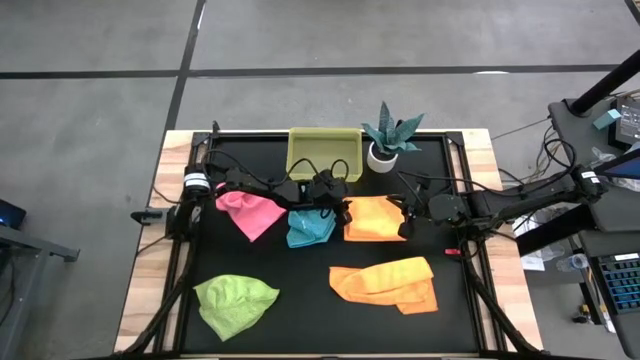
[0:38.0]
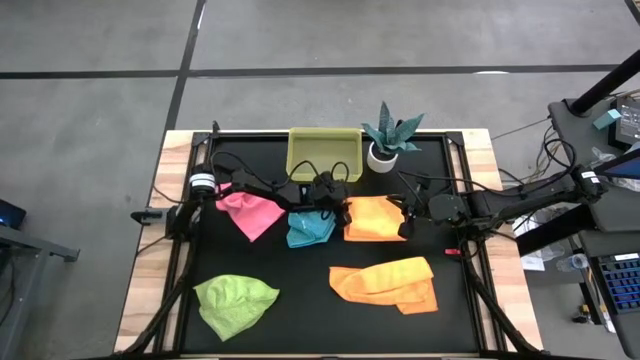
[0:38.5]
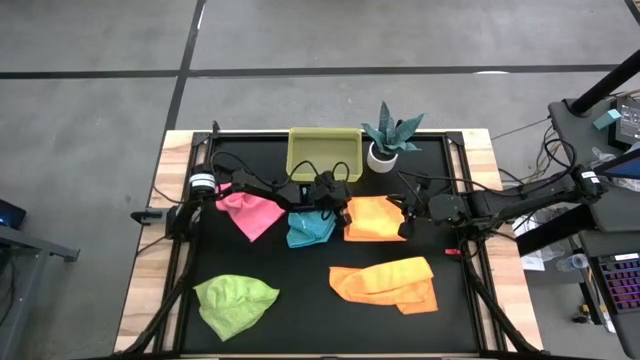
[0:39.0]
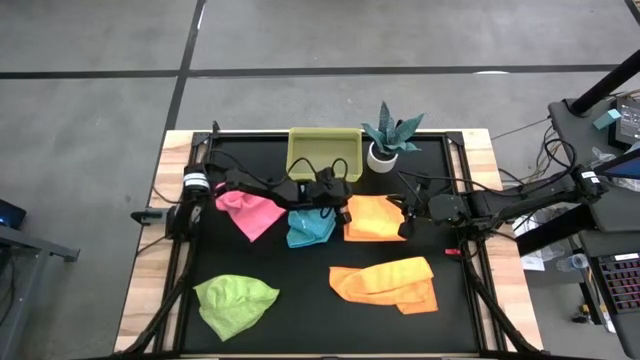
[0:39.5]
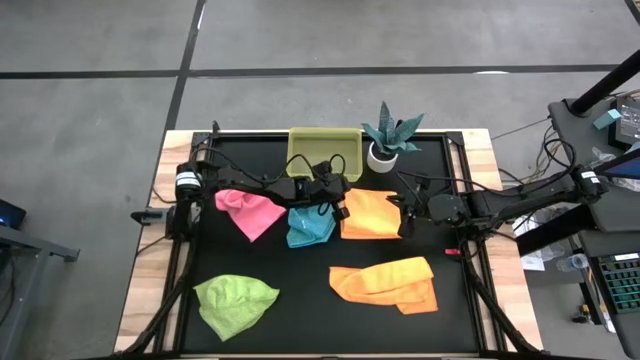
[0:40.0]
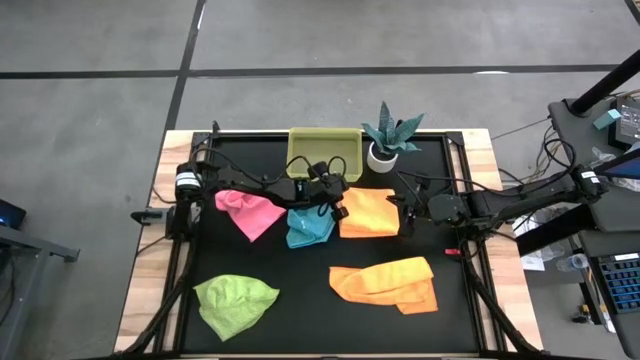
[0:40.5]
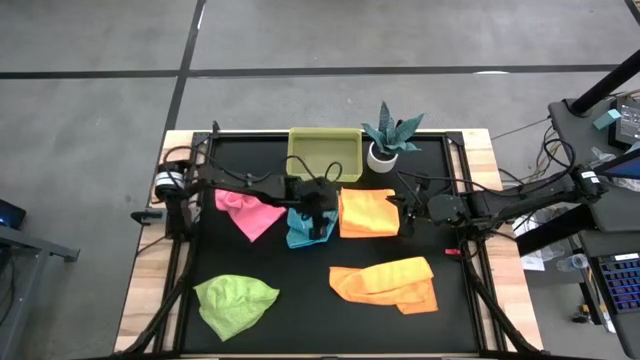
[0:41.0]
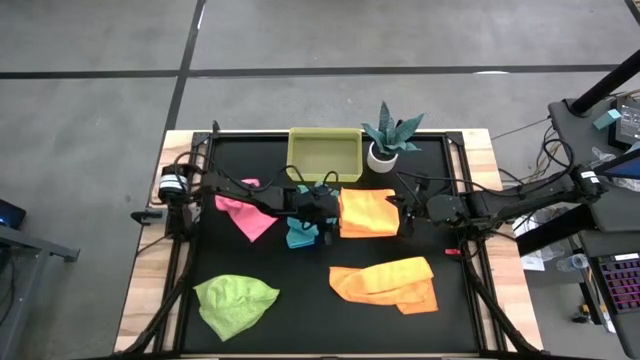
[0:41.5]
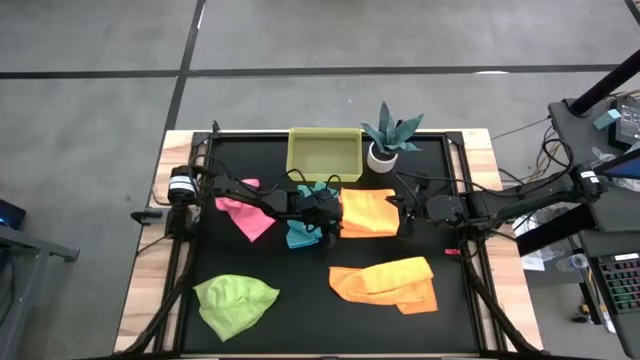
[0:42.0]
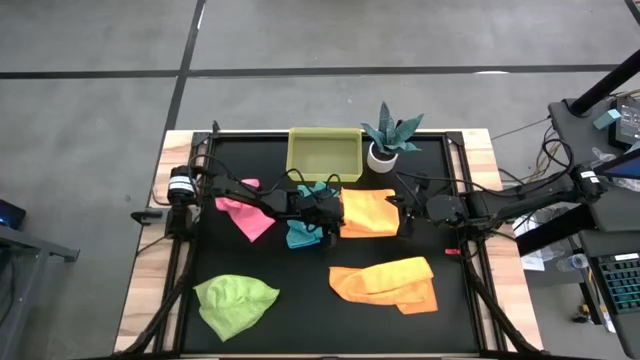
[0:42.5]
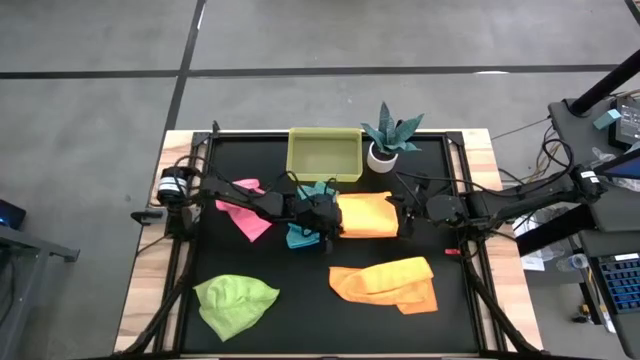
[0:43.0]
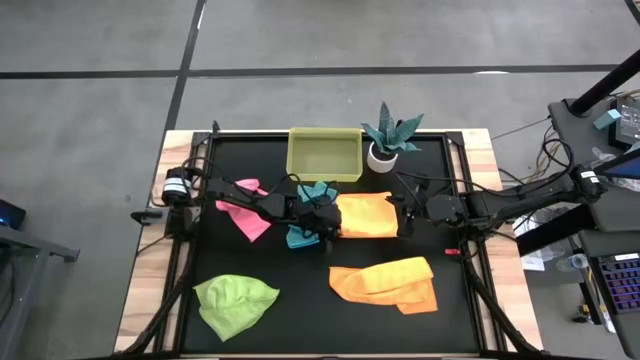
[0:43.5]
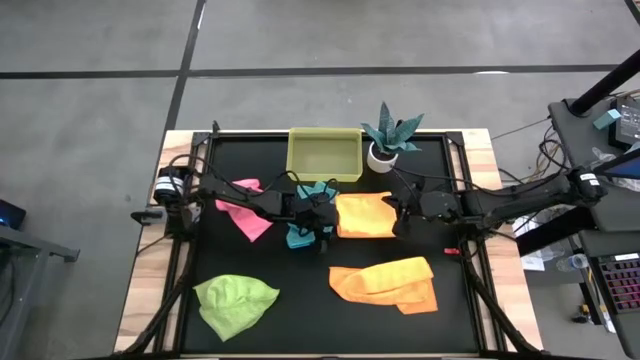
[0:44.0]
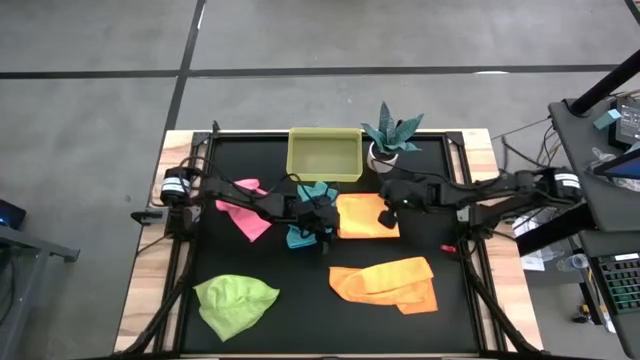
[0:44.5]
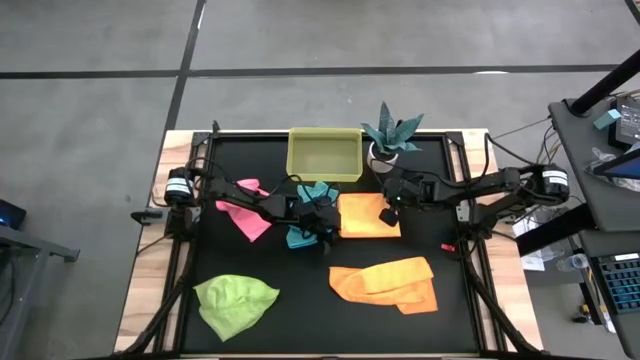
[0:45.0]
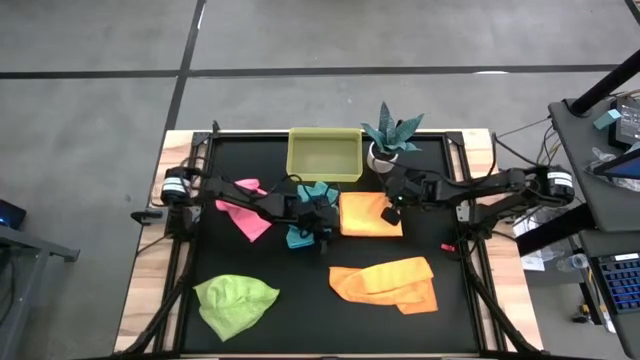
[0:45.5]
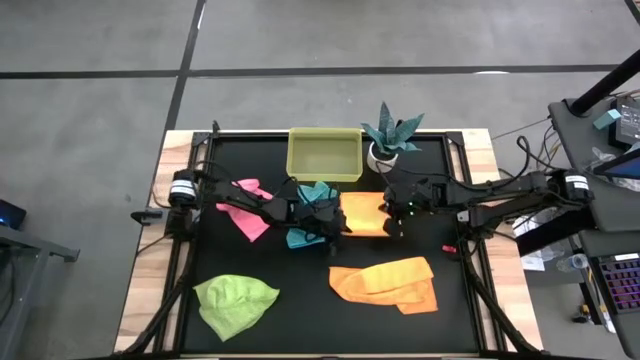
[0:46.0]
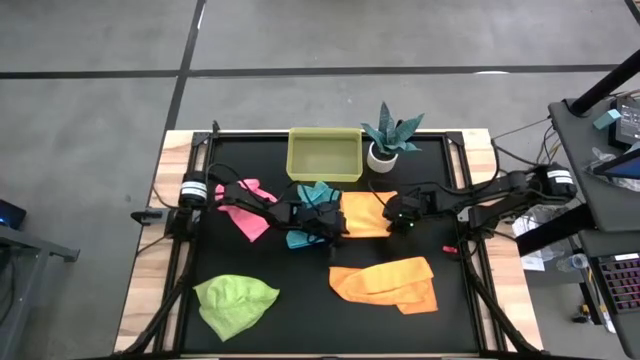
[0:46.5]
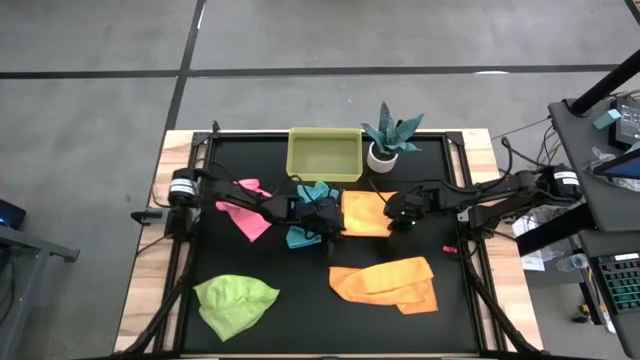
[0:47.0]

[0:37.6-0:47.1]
Task: Fold microfiber towels
Fold the top orange microfiber cloth

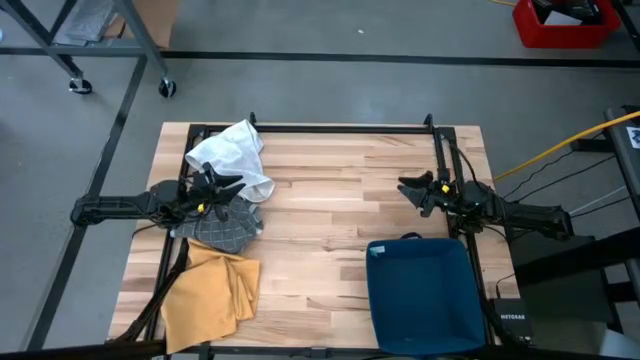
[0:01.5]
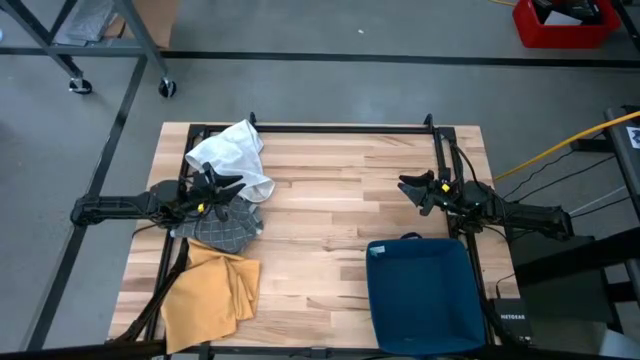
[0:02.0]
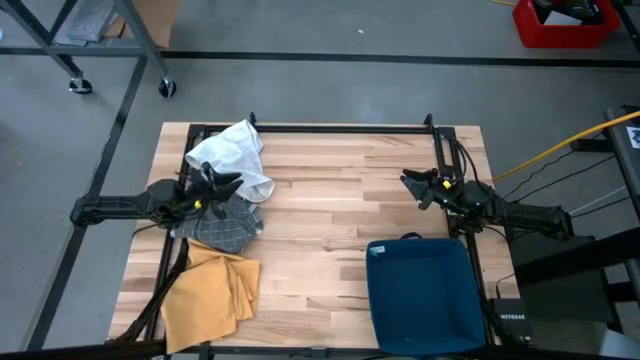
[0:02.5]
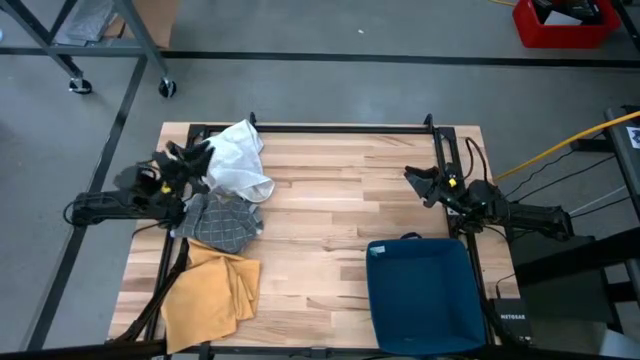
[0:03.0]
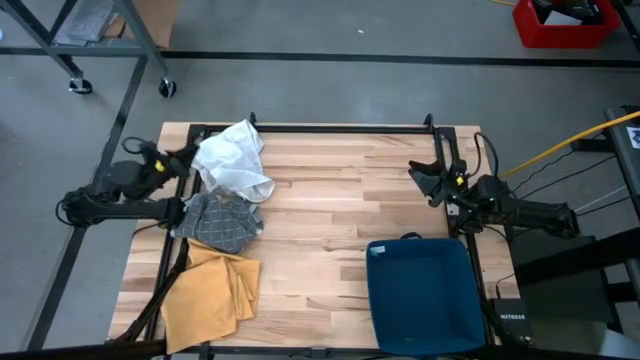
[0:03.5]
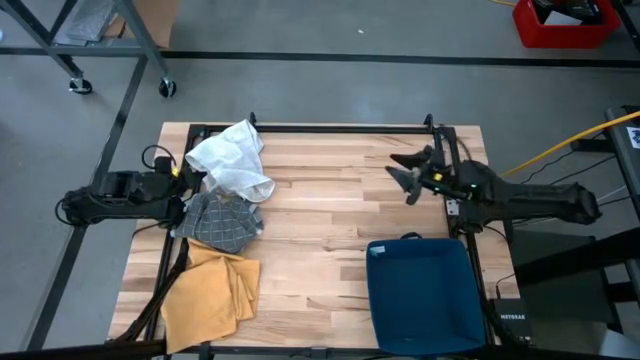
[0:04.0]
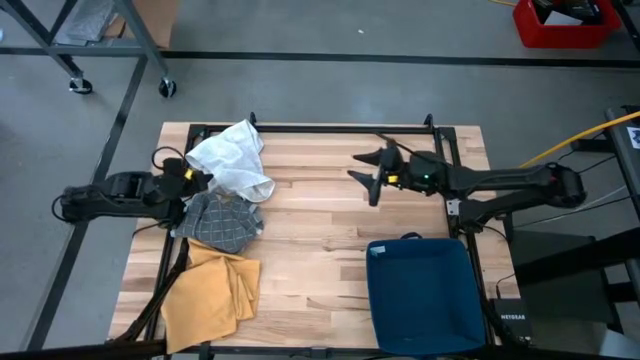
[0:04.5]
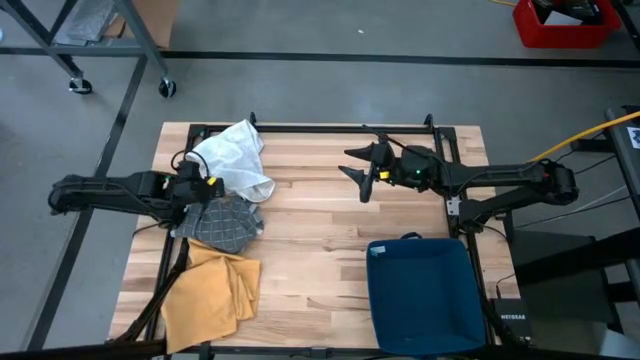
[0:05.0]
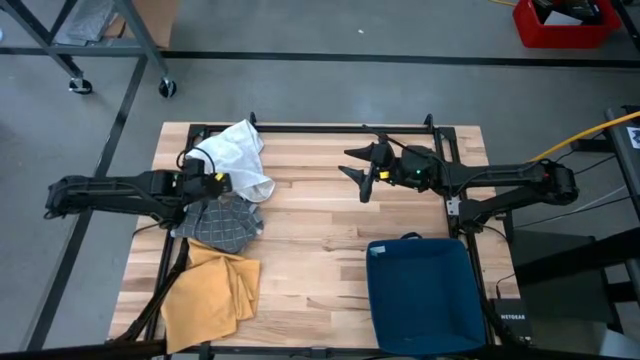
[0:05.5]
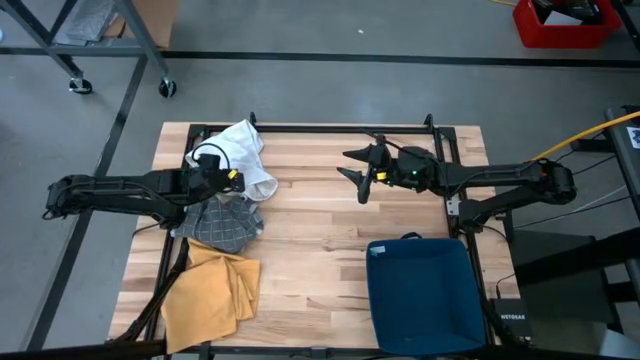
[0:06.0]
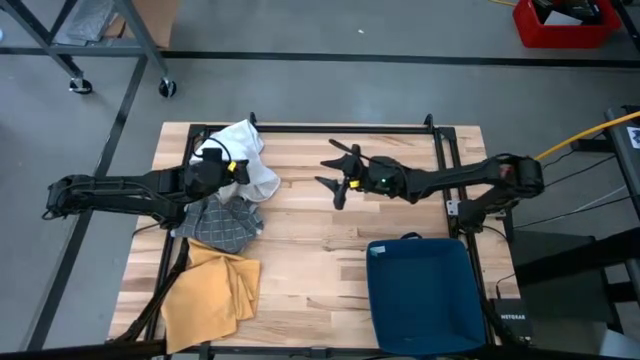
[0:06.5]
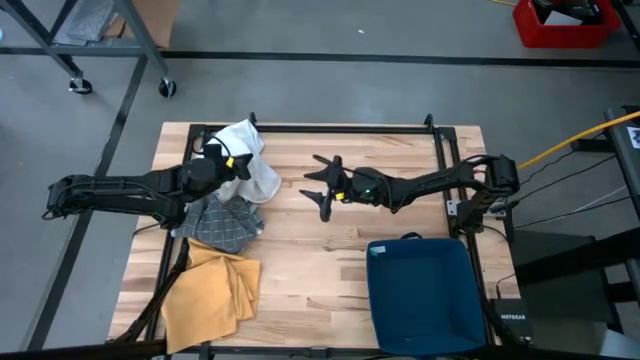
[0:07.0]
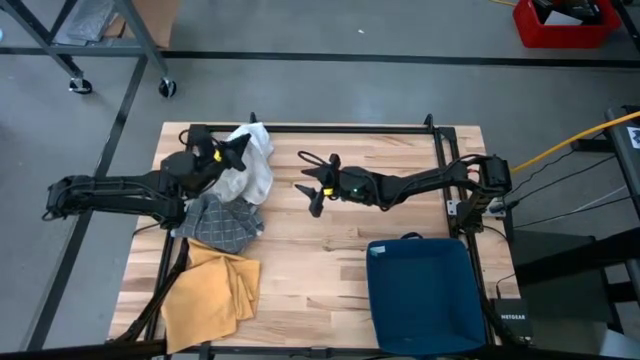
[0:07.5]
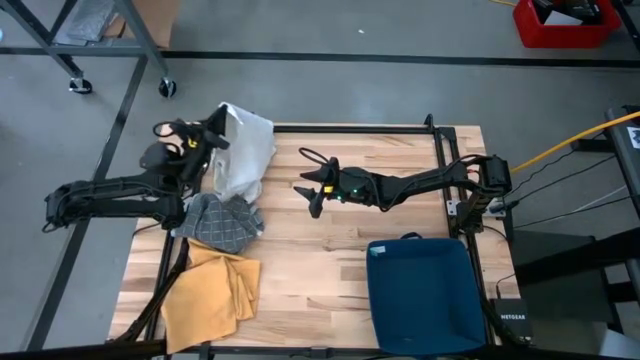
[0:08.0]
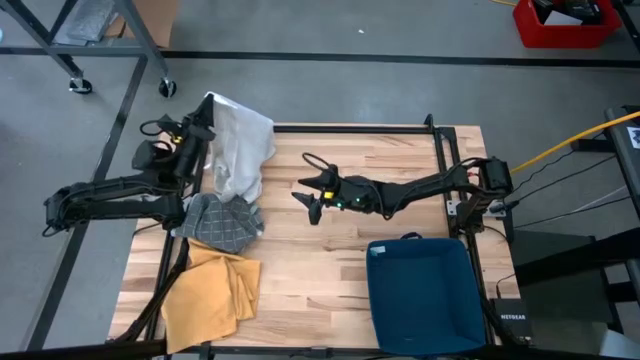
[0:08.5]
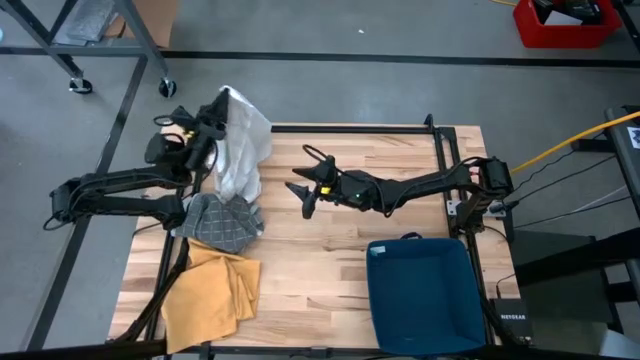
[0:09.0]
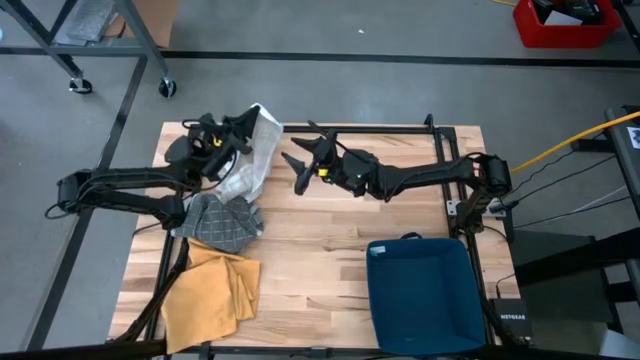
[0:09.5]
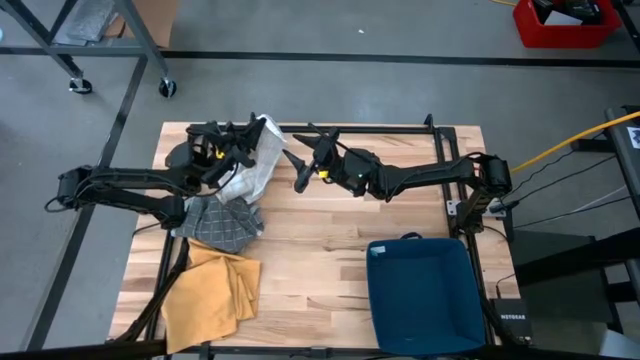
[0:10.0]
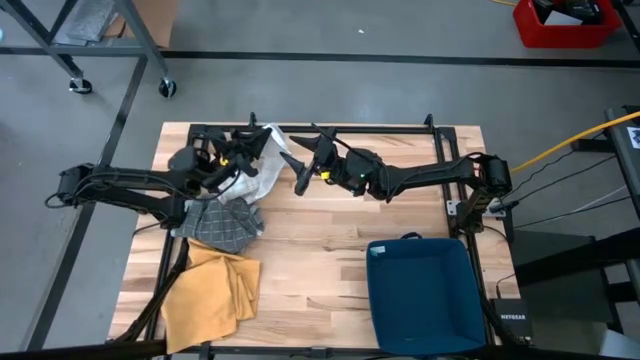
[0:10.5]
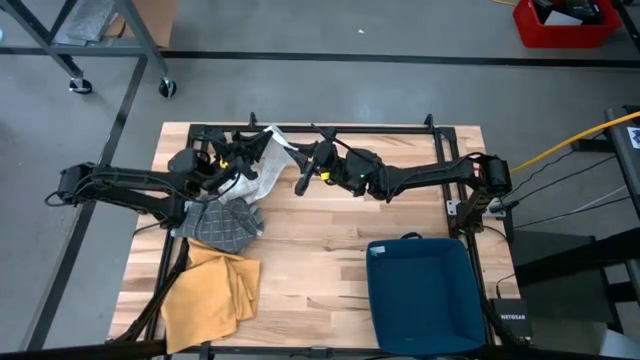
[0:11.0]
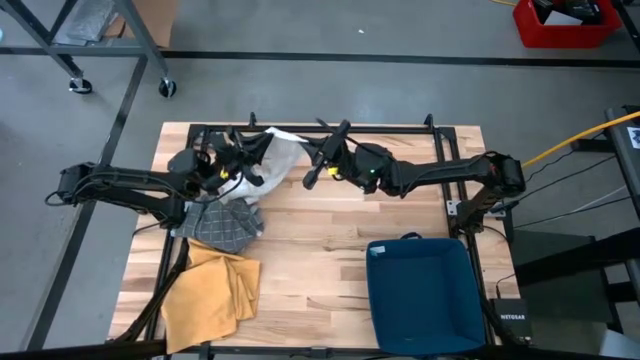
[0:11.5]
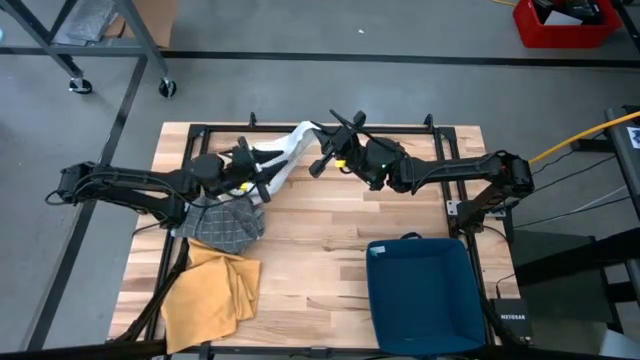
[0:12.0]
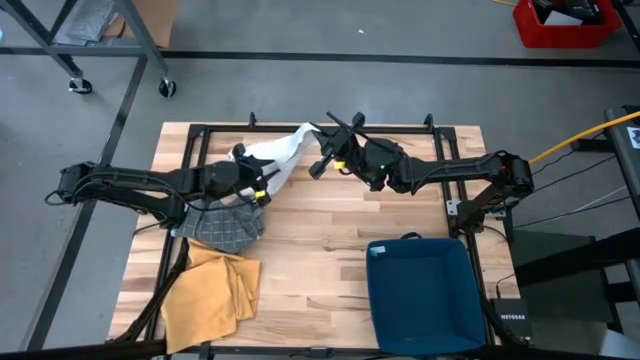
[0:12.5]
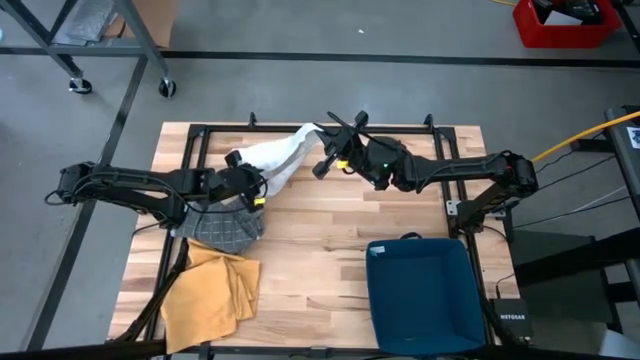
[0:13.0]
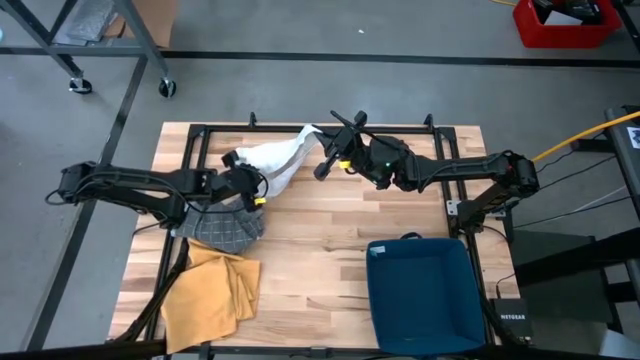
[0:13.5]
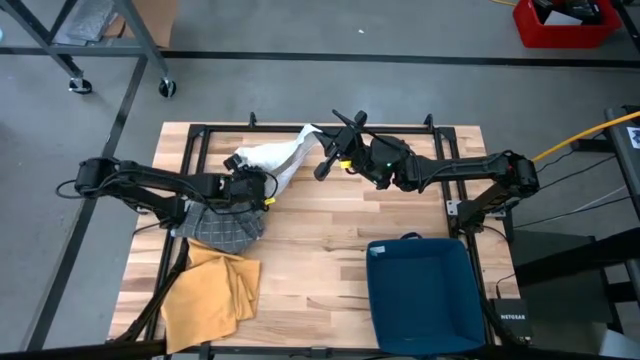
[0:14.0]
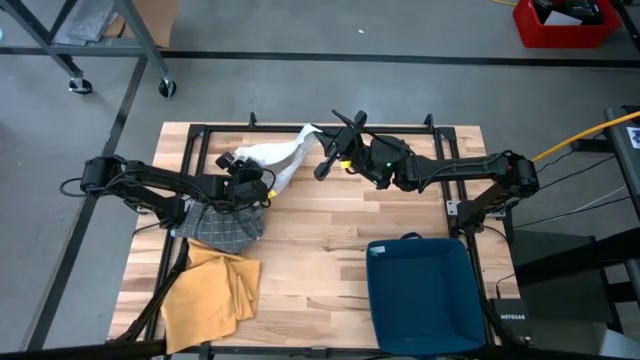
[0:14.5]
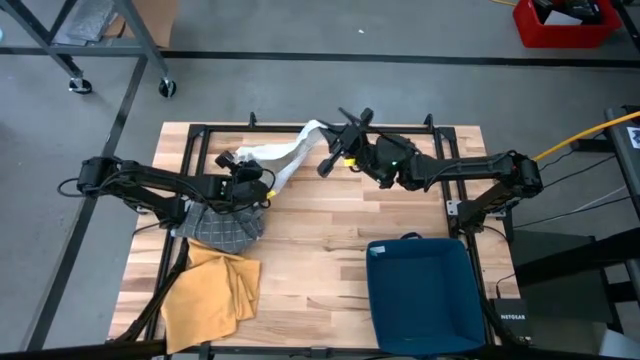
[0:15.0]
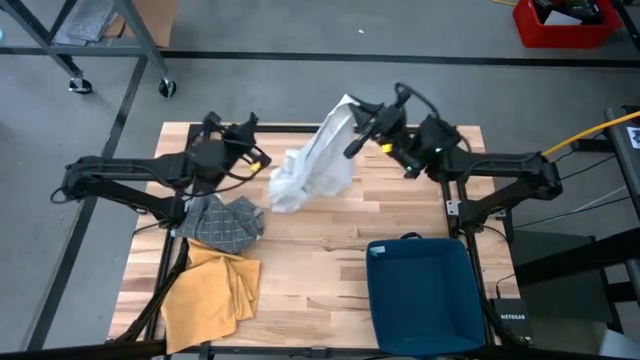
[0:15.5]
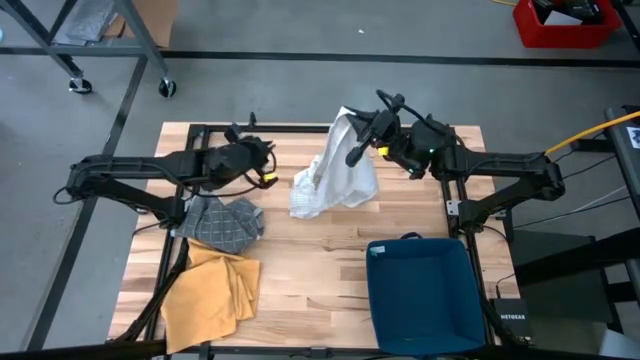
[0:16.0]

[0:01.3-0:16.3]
Task: Fold towel
Fold the white towel
